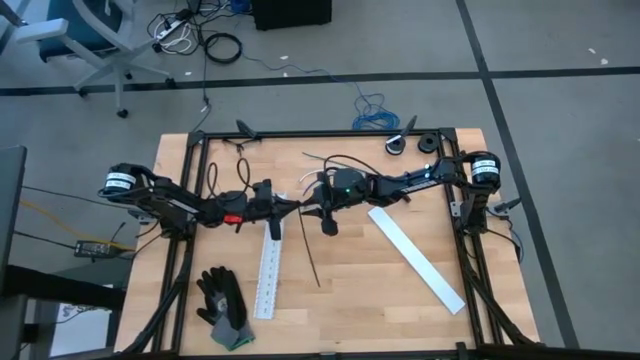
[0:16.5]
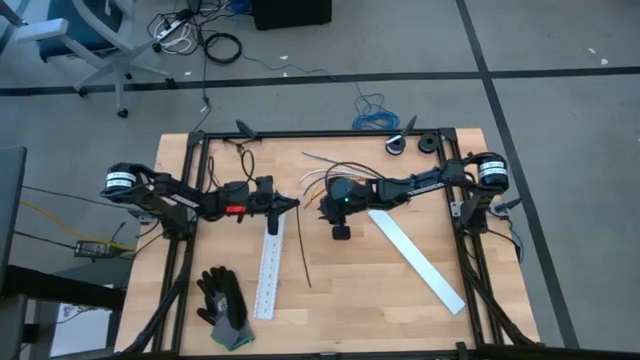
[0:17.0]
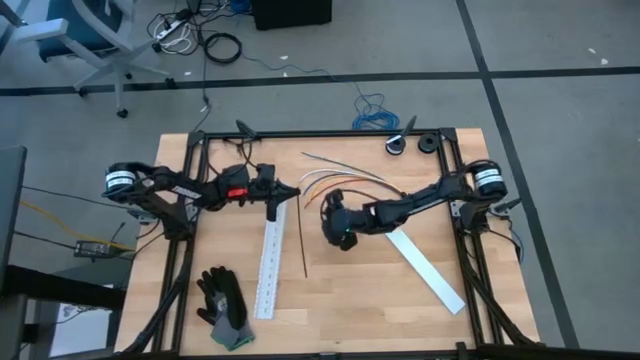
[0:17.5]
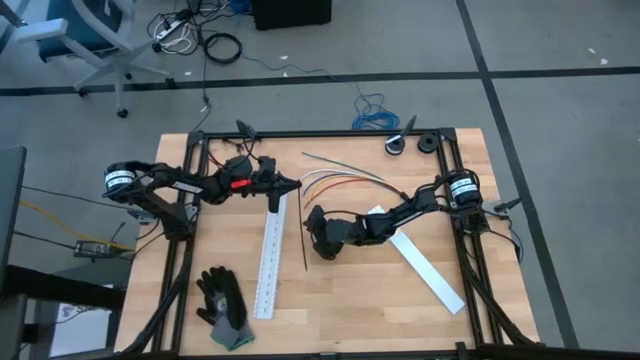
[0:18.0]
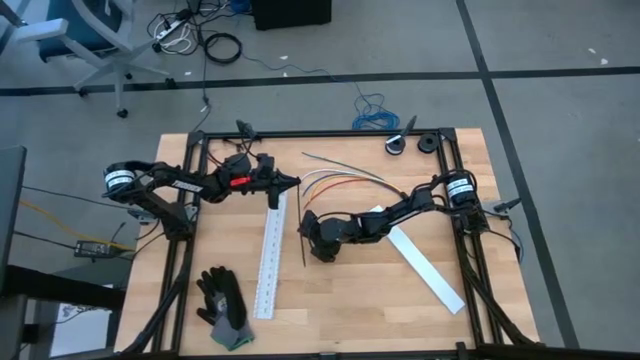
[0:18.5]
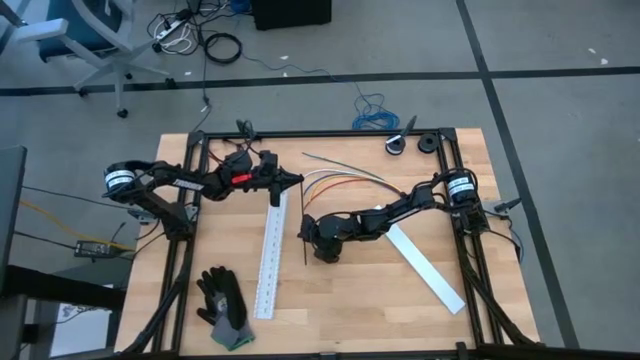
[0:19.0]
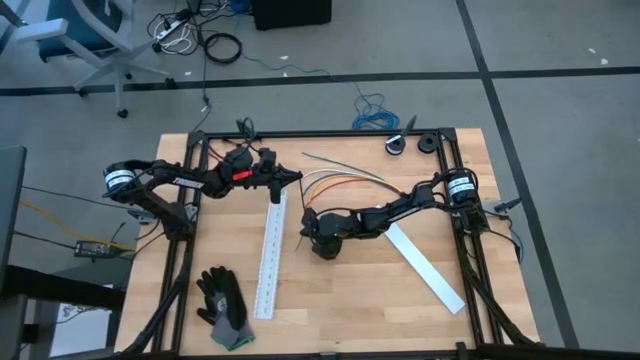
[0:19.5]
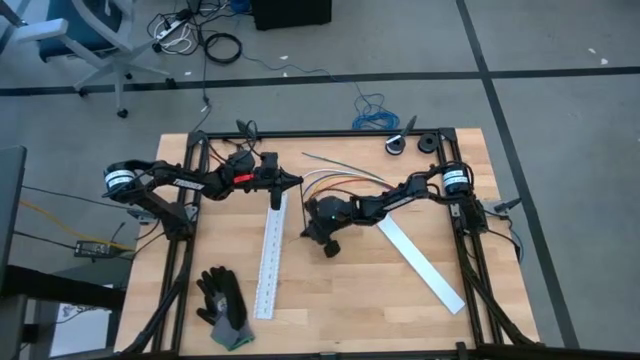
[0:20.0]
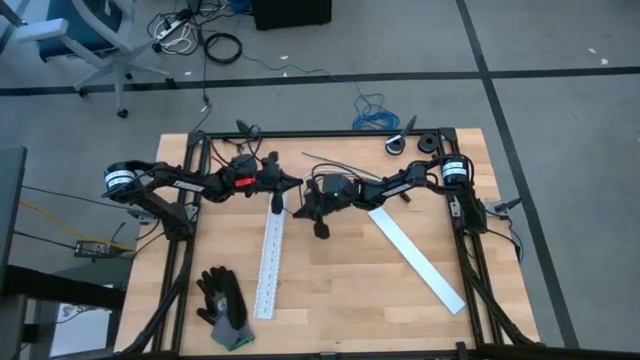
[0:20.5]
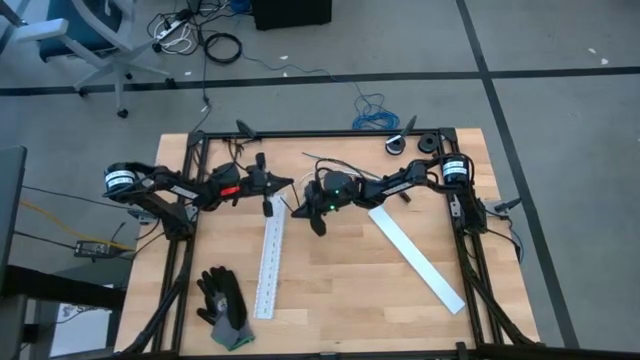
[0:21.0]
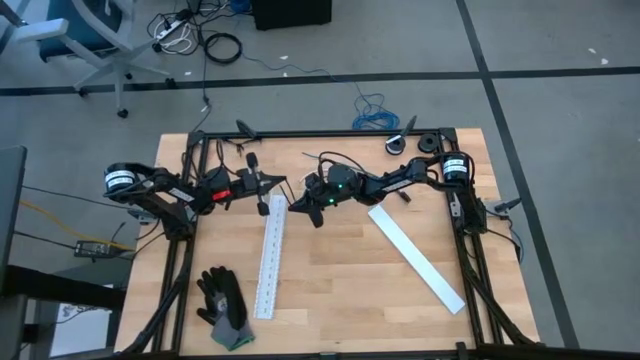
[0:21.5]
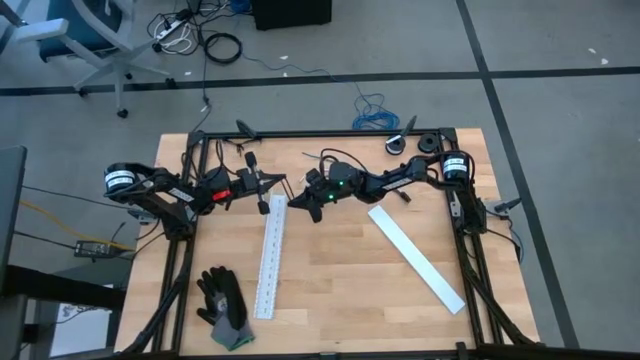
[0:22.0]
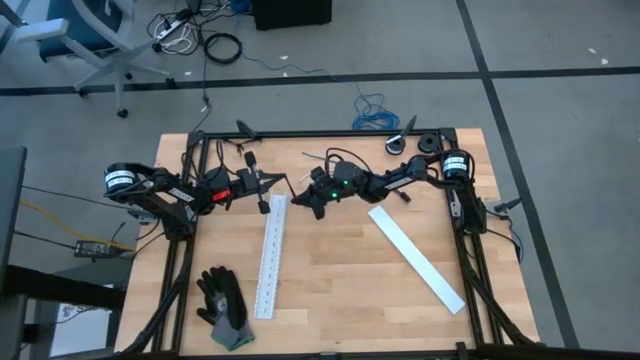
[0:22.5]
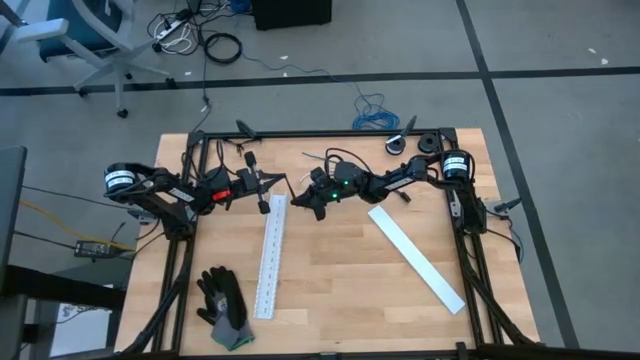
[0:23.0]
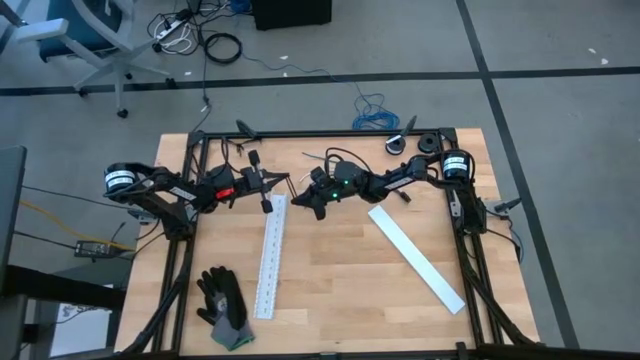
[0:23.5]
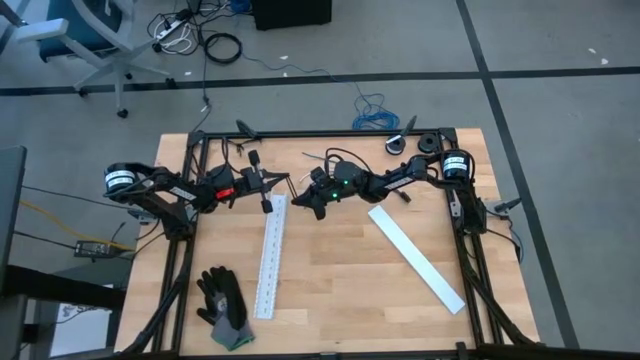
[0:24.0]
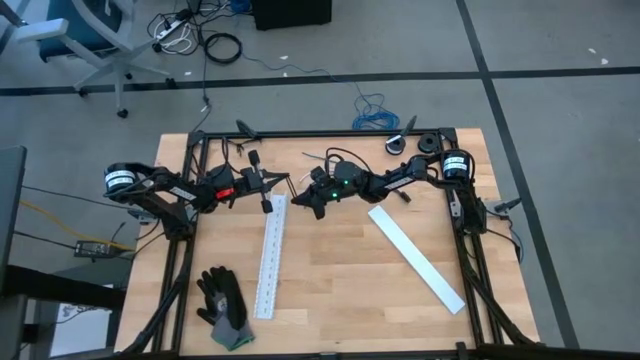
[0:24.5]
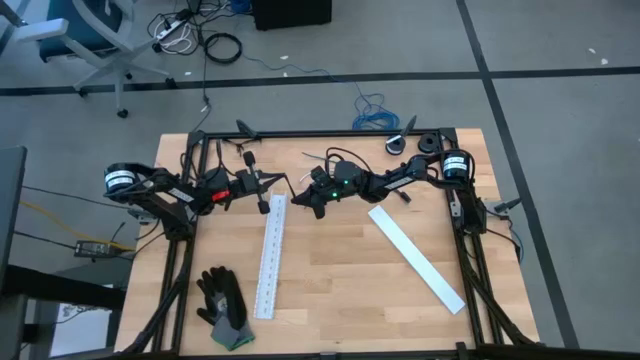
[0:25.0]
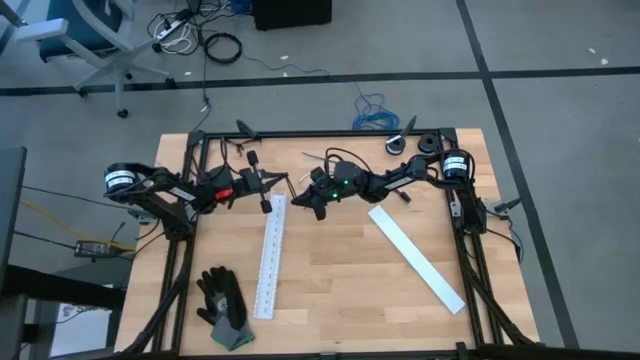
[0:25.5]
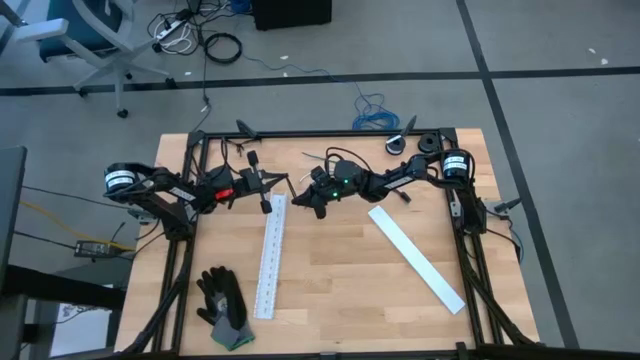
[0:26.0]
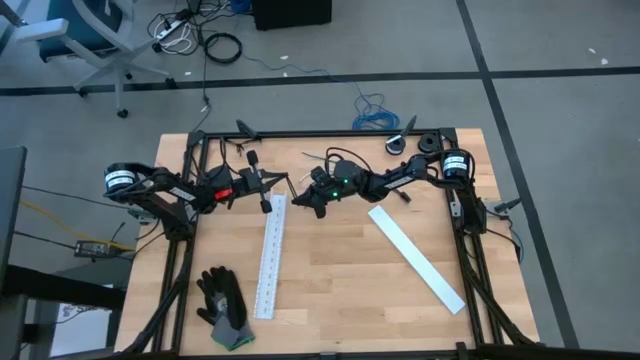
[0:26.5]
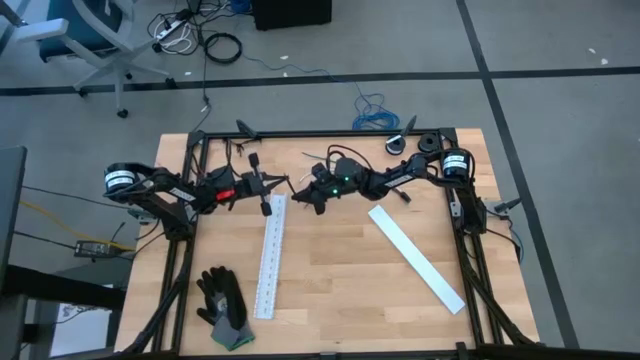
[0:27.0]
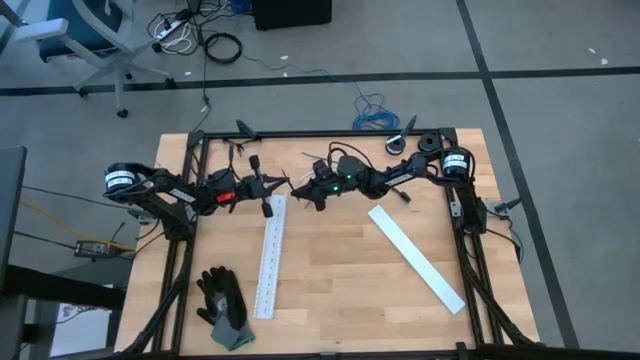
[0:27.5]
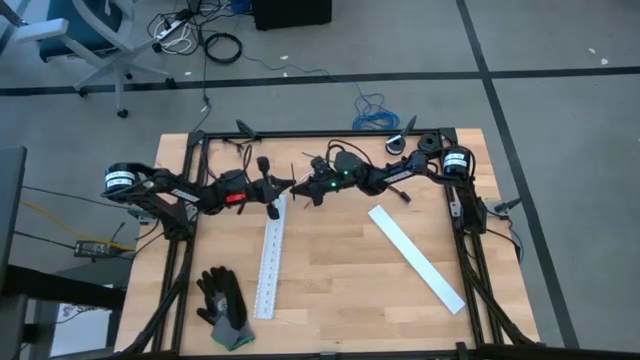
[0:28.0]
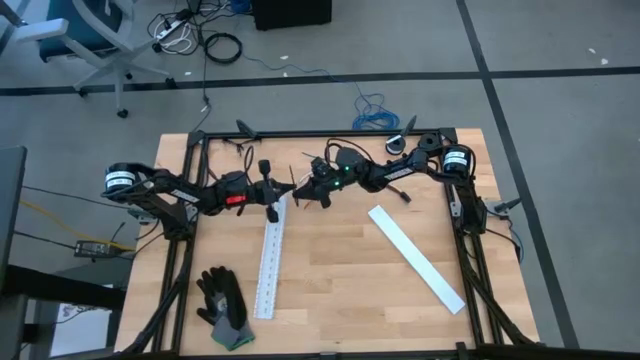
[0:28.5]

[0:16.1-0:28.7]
Task: Ziptie cables
Insert the black zip tie into the locking head

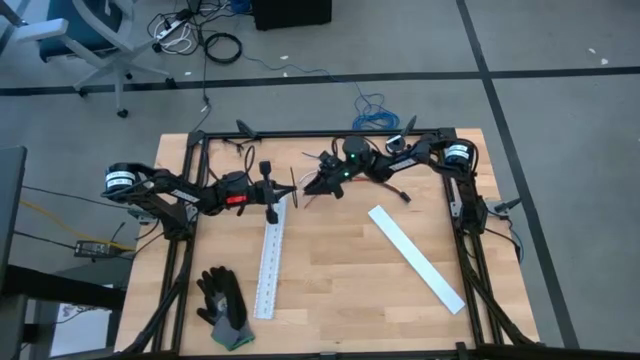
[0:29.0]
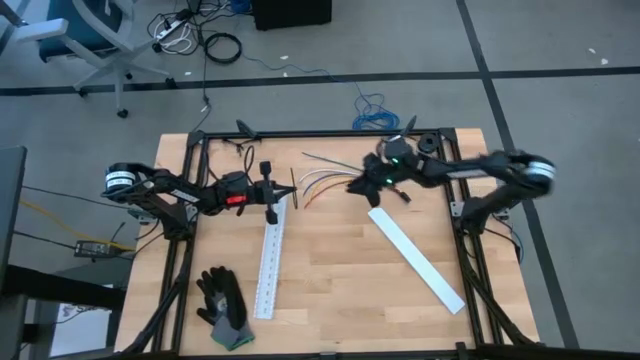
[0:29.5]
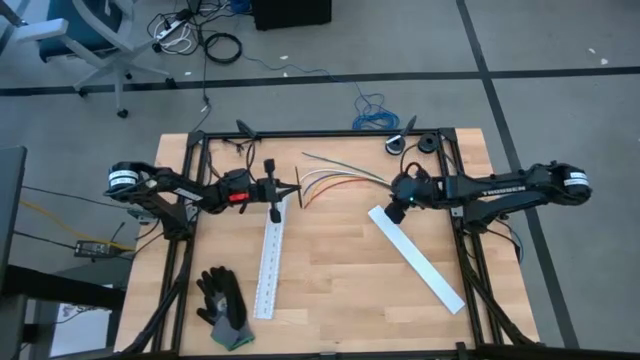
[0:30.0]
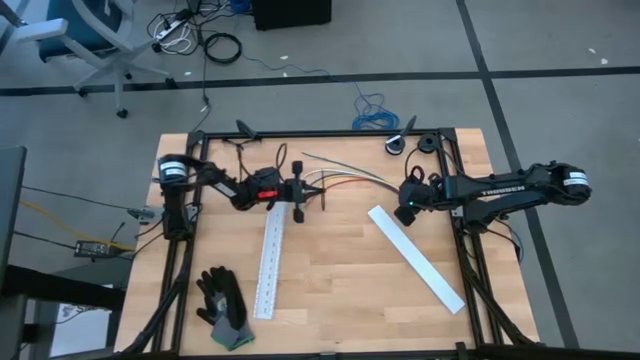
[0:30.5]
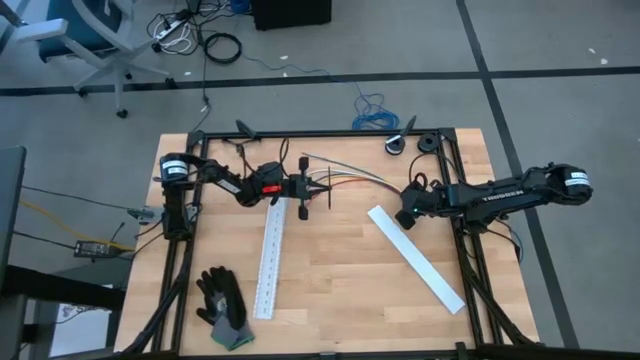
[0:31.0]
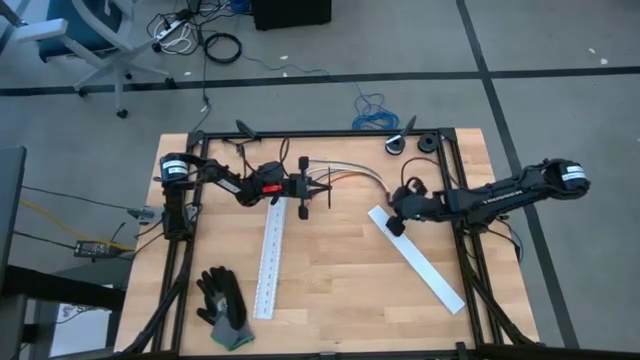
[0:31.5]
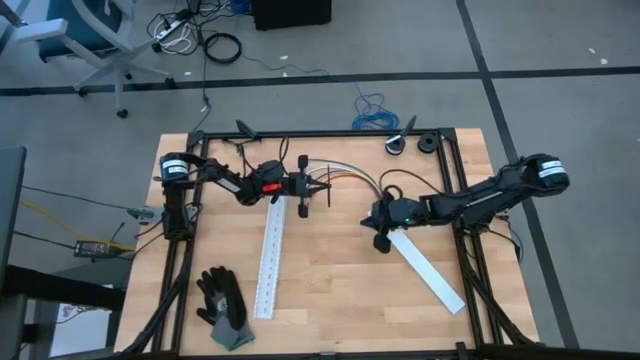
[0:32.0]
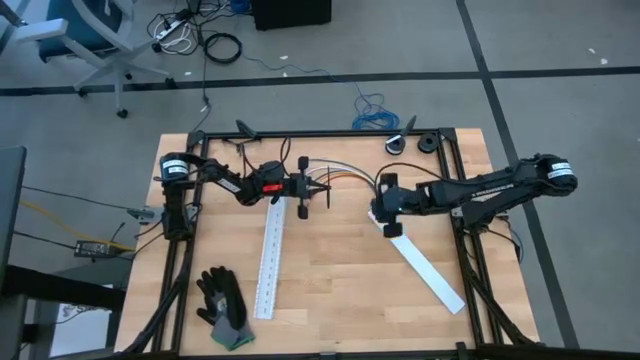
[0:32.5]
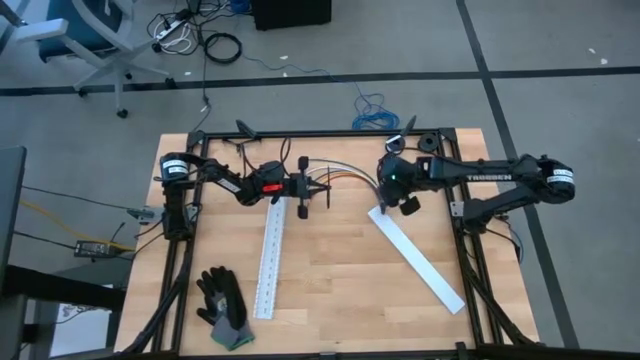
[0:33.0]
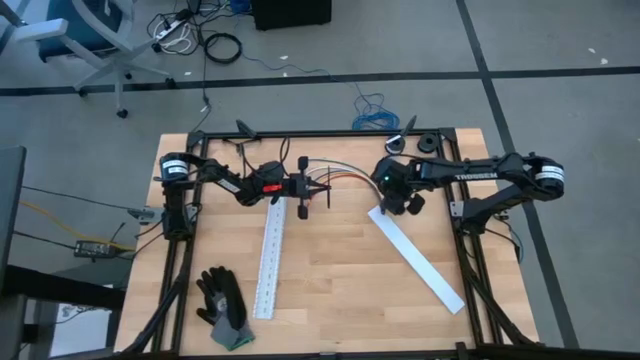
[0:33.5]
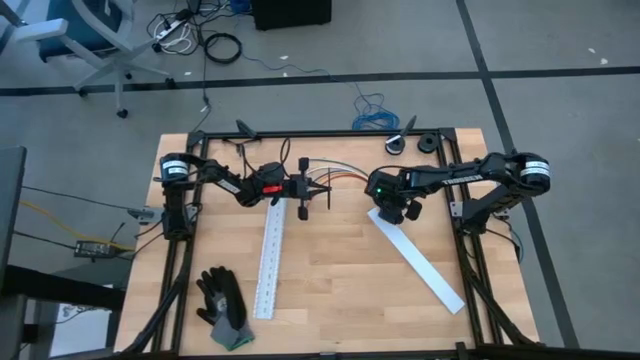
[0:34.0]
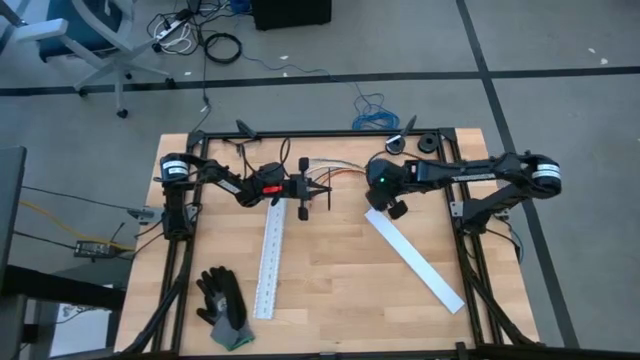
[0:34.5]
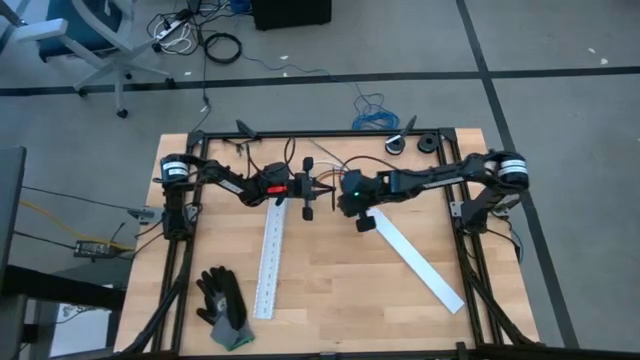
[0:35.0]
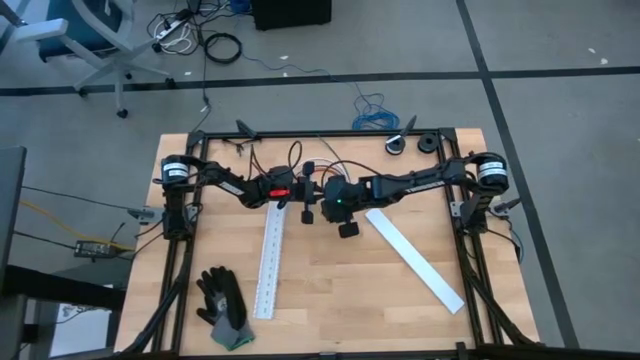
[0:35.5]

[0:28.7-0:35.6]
Wrap the cable wires with the black zip tie

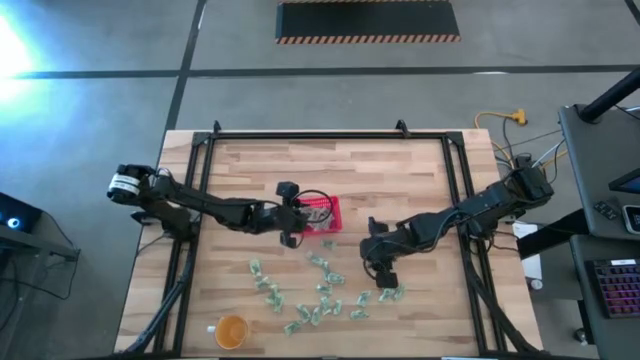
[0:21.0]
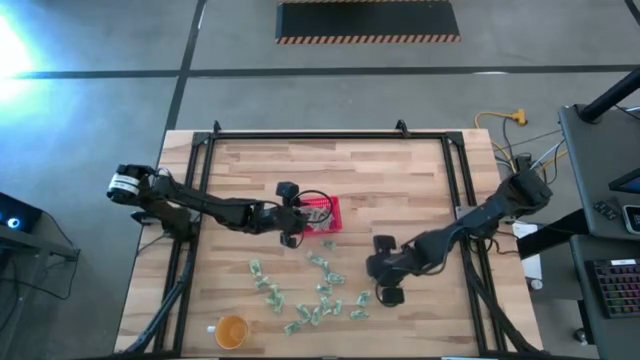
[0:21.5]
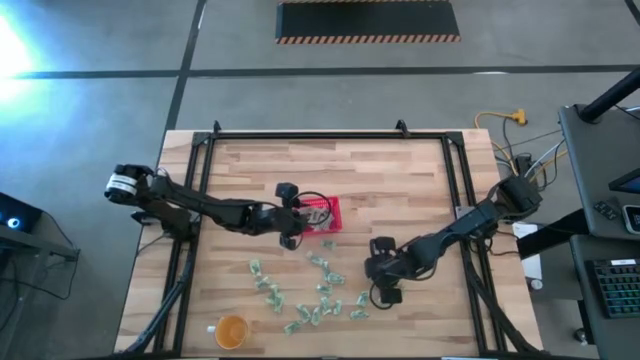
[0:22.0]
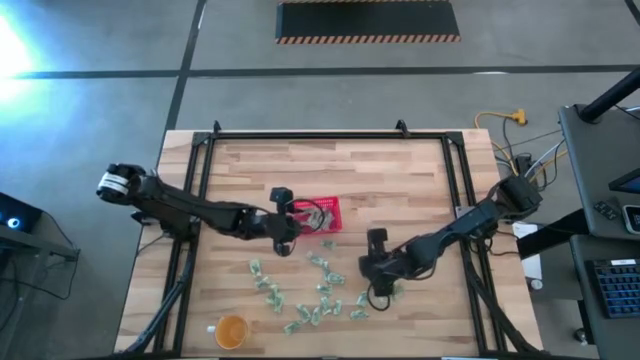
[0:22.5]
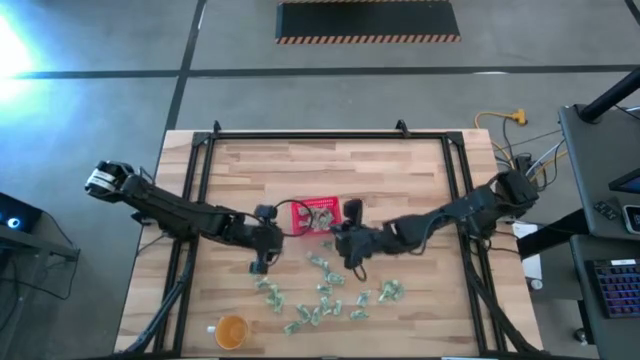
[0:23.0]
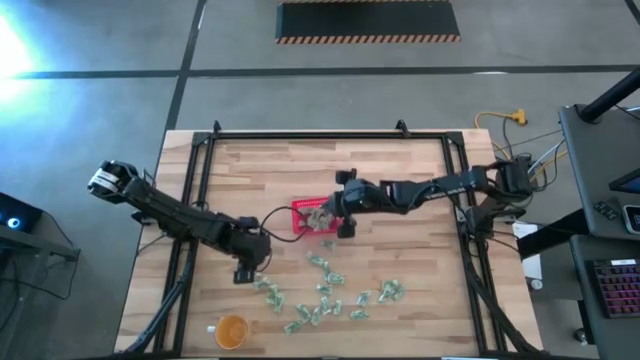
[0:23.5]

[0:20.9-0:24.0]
Task: Pick and place items into bin
Put the stevia packet into the red bin
